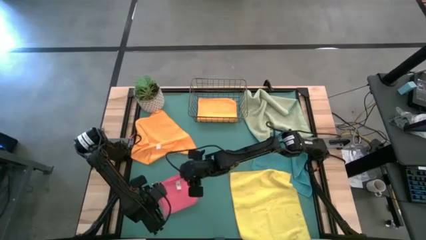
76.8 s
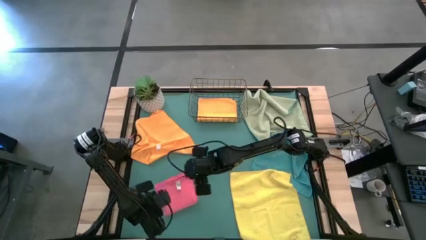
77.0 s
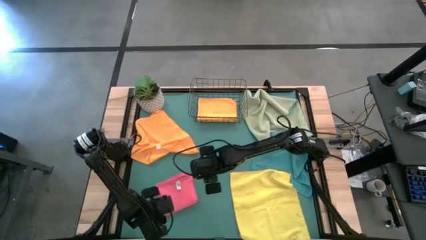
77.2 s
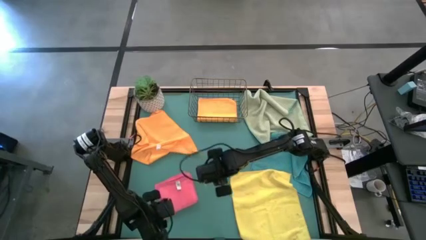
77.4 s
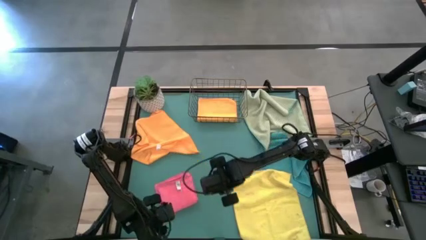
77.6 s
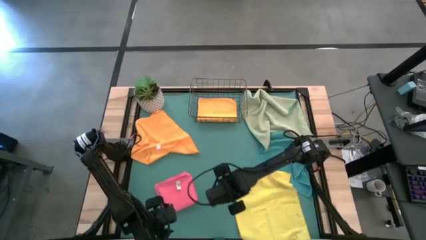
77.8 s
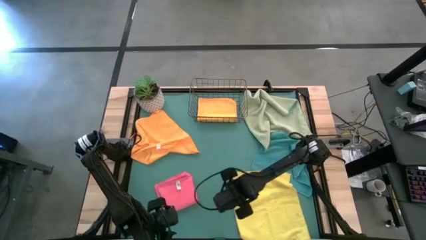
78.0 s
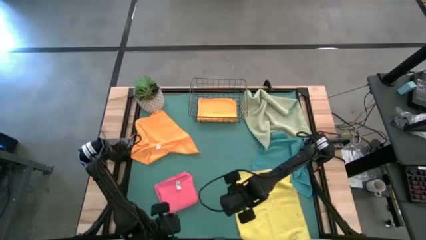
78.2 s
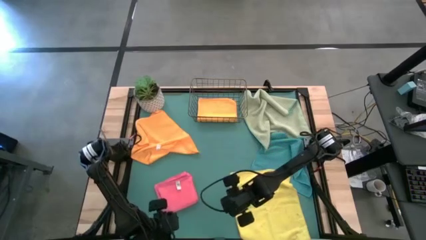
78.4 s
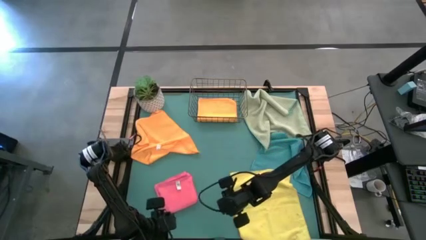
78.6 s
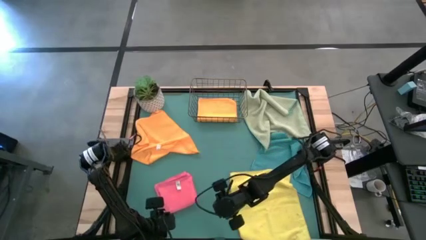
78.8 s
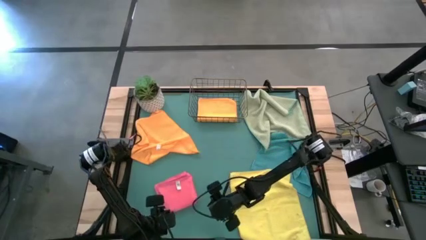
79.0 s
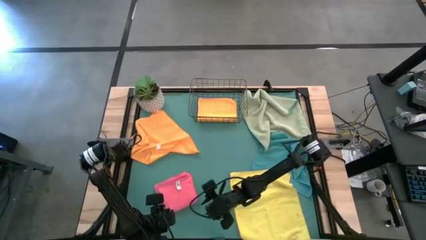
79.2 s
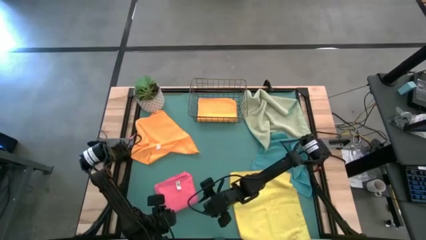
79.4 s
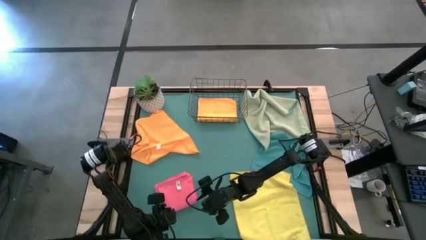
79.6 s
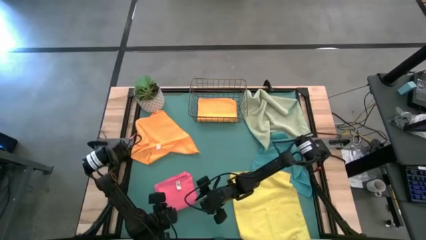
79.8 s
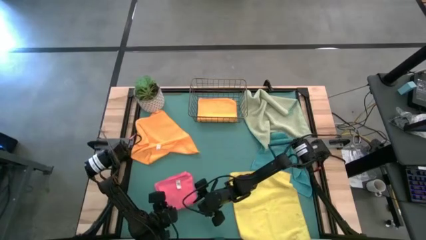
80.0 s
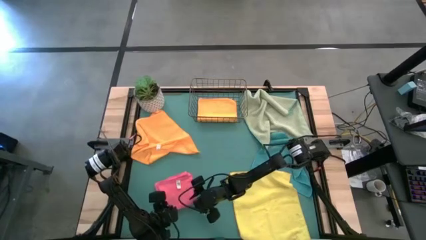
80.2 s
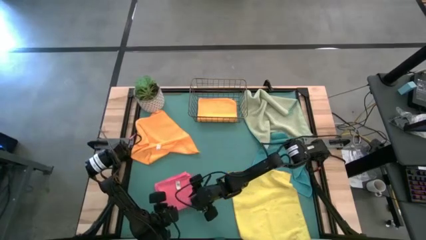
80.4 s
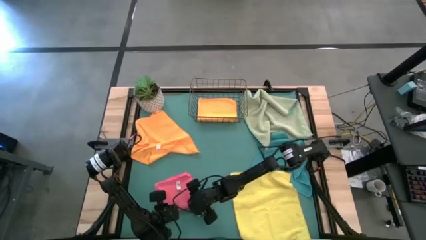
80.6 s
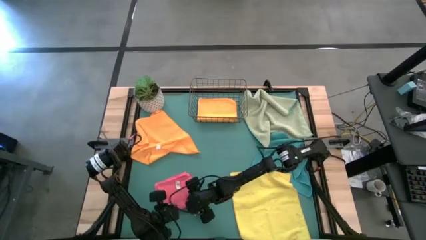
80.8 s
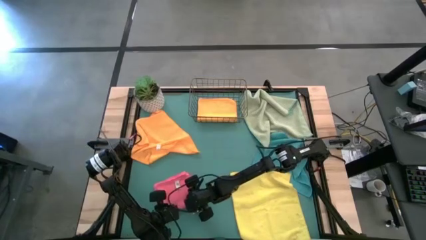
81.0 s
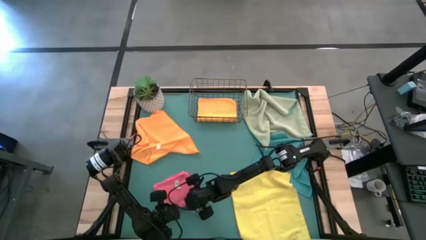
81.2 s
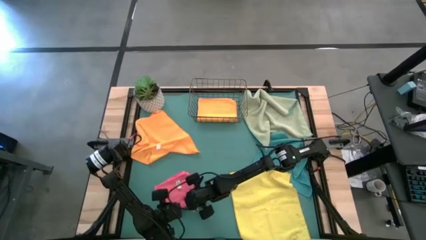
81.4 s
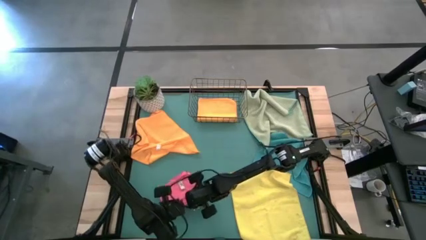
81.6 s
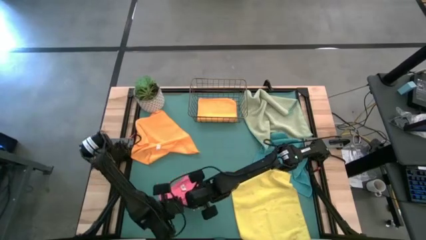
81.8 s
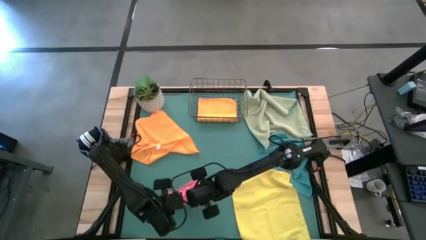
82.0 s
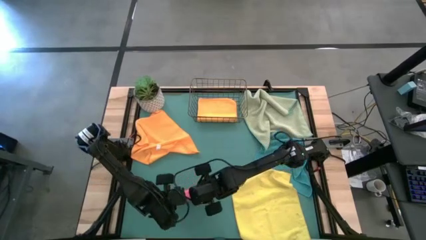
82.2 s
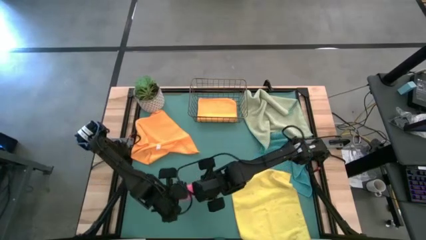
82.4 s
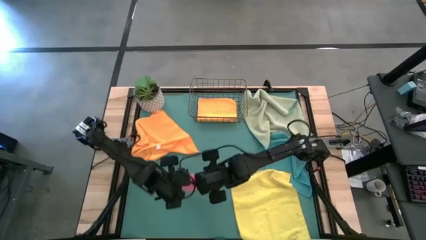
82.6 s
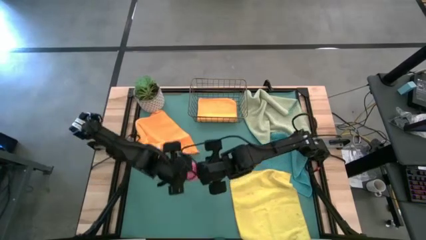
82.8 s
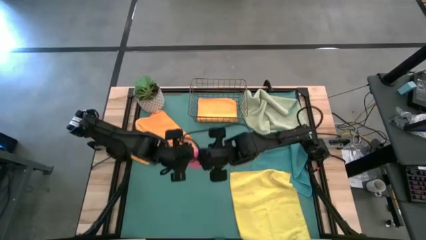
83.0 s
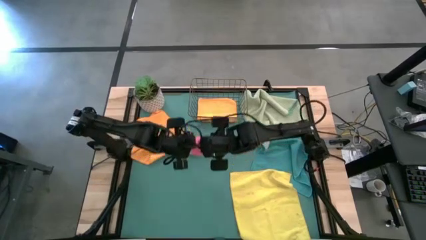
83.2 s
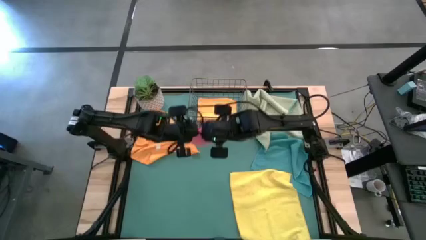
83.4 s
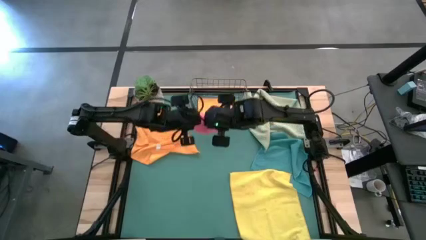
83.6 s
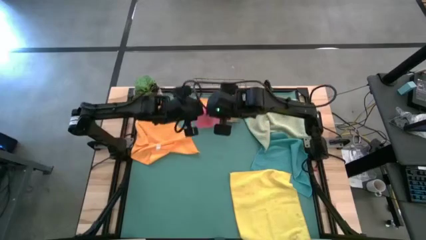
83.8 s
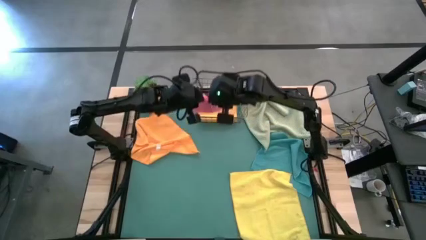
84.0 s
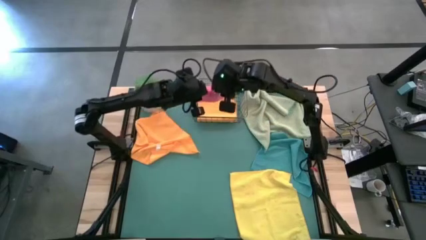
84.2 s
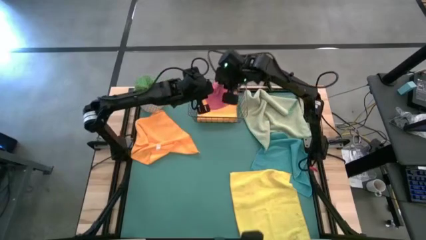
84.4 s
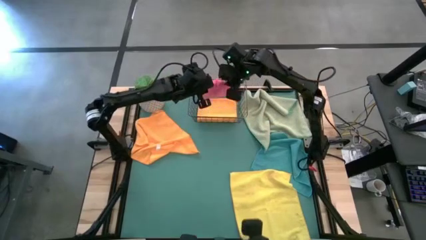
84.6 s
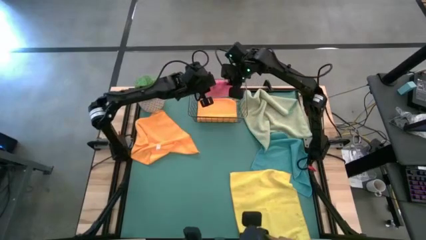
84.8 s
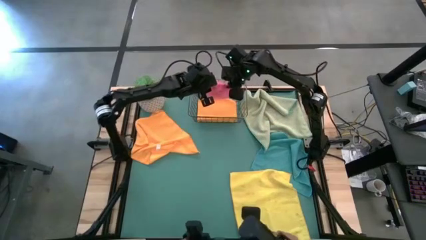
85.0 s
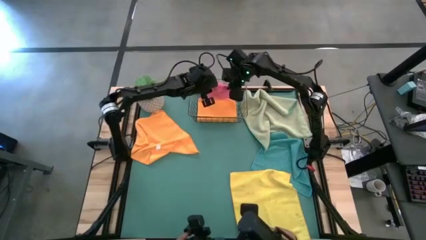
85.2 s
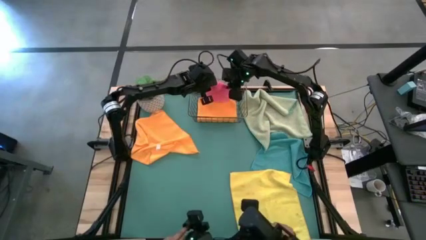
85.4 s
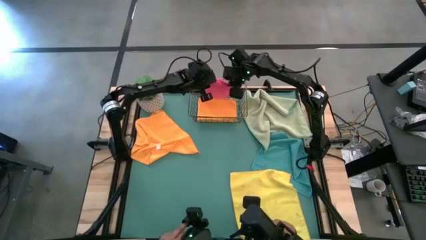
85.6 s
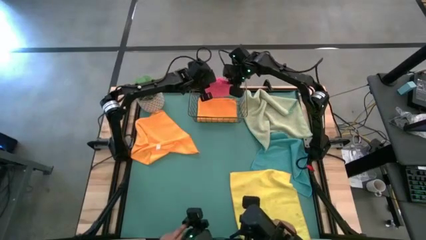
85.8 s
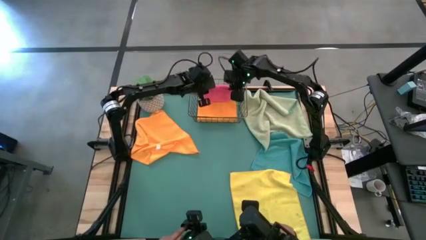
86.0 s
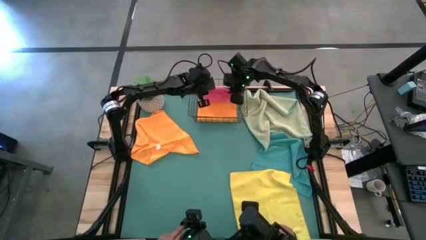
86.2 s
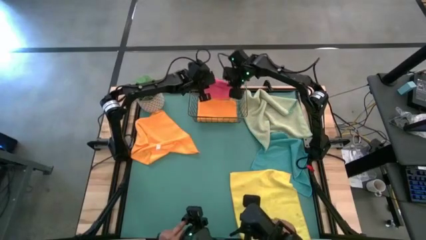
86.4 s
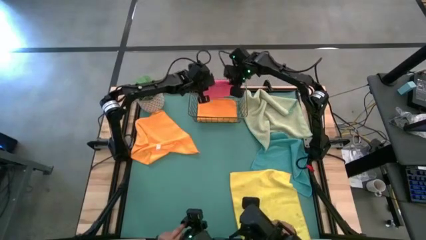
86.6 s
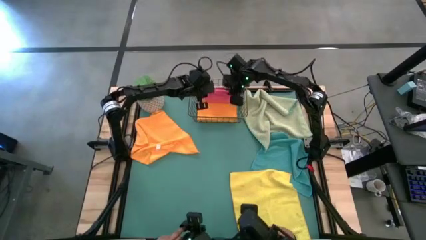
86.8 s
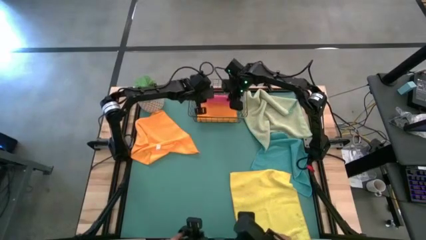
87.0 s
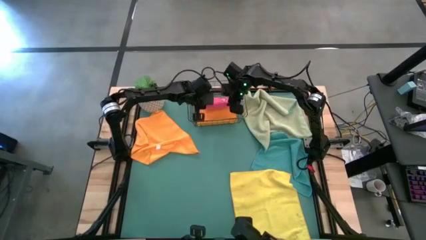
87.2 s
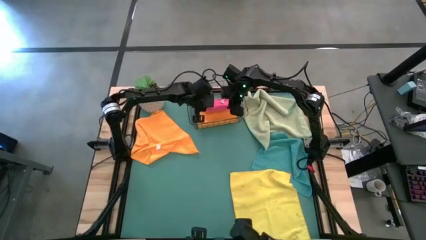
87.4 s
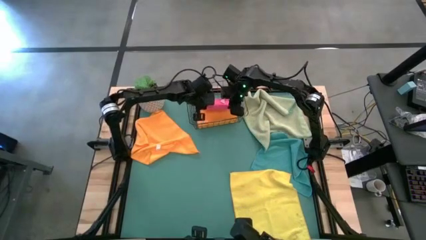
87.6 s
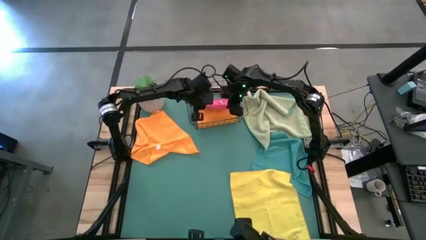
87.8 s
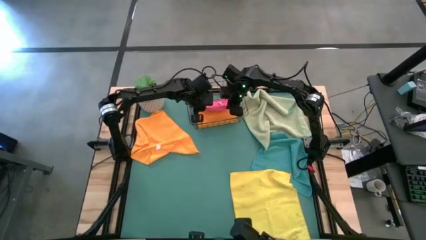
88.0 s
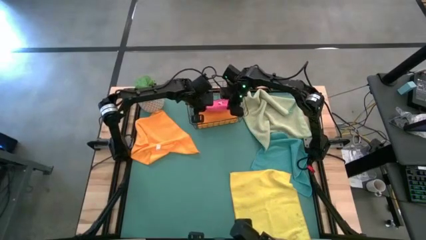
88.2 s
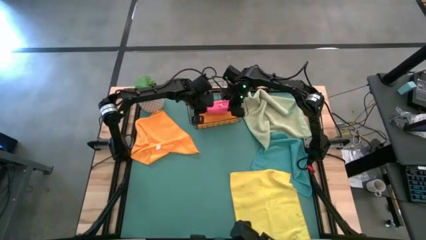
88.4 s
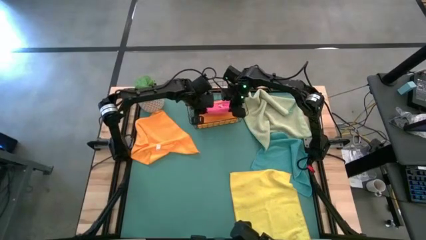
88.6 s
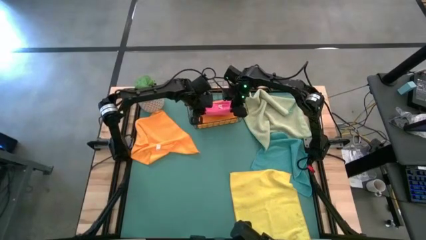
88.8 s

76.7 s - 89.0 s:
Task: Fold microfiber towels
Put the folded pink microfiber towel into the wire basket

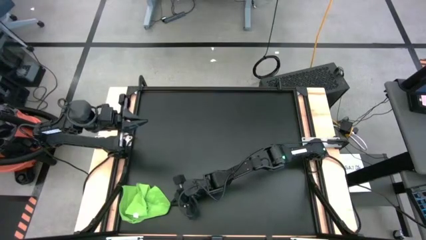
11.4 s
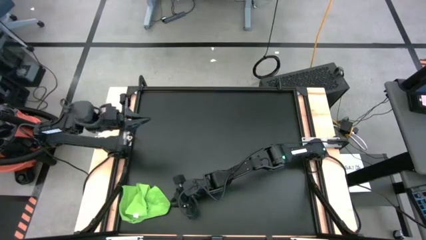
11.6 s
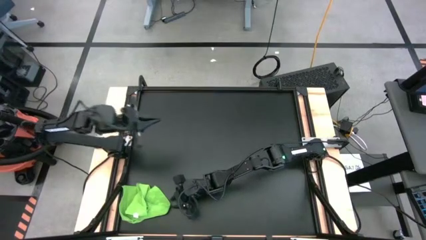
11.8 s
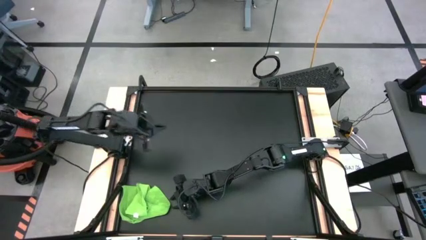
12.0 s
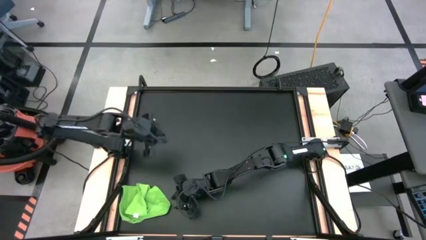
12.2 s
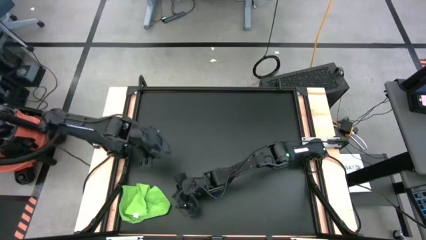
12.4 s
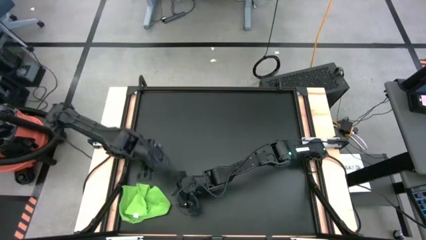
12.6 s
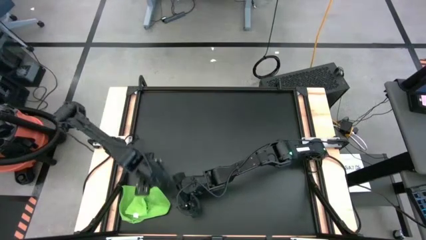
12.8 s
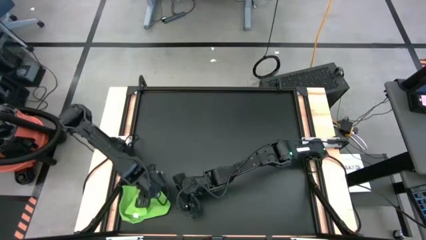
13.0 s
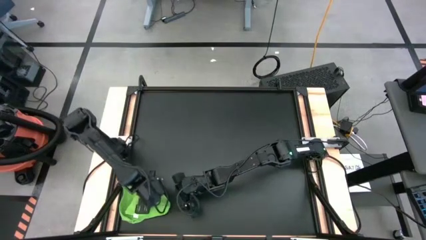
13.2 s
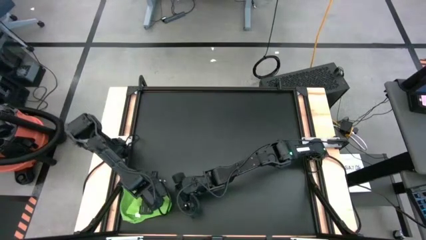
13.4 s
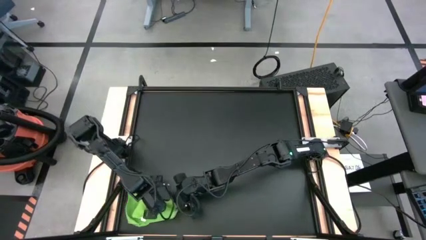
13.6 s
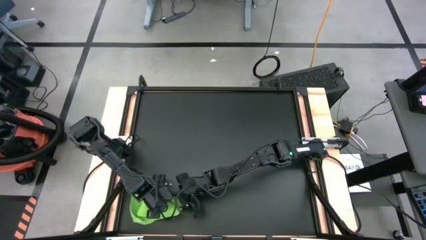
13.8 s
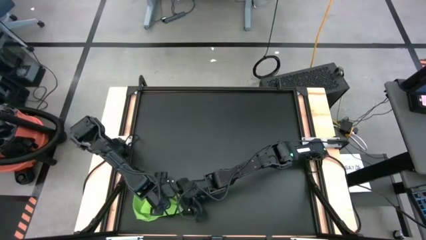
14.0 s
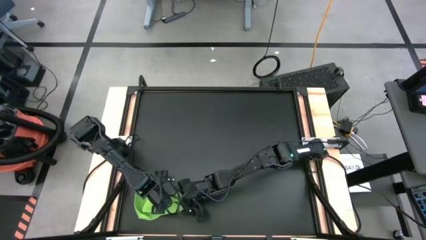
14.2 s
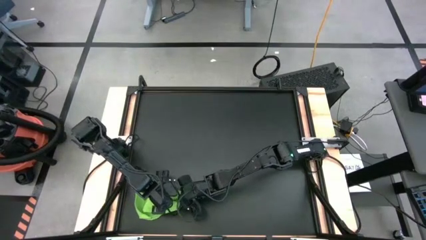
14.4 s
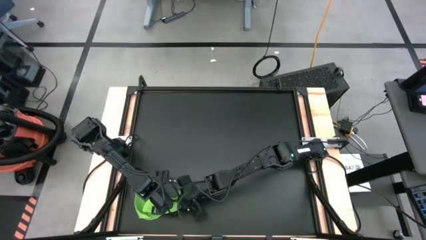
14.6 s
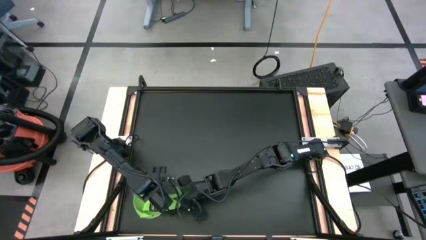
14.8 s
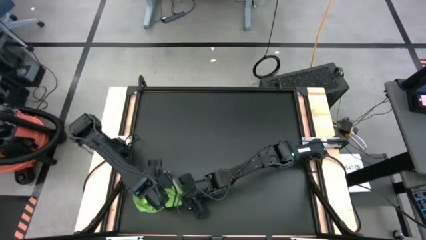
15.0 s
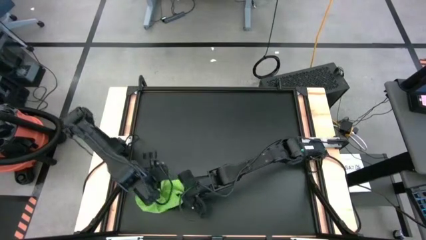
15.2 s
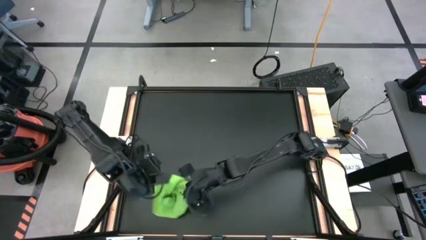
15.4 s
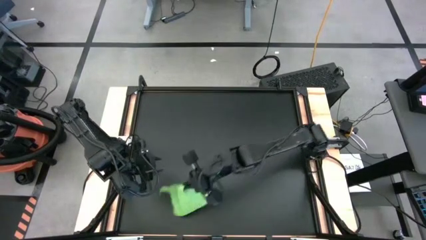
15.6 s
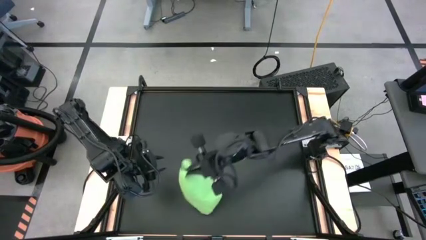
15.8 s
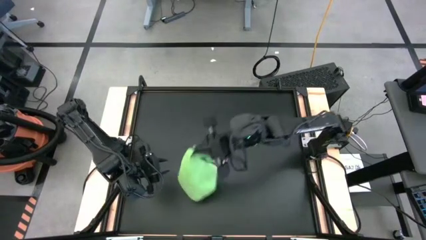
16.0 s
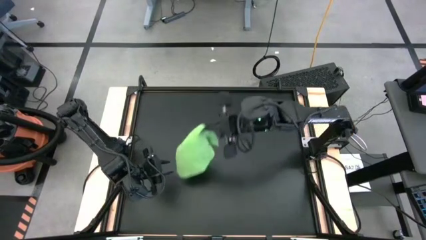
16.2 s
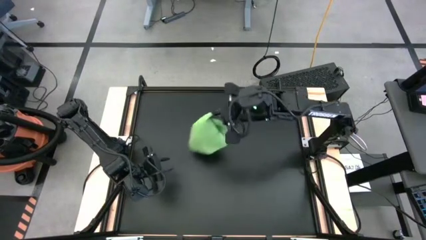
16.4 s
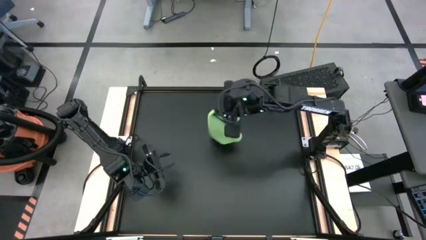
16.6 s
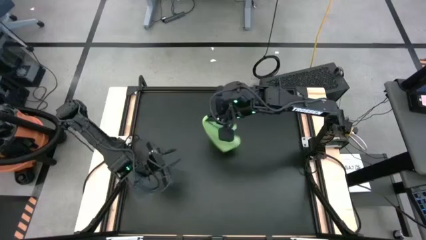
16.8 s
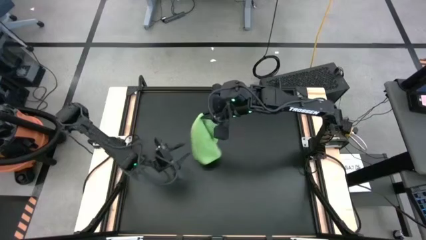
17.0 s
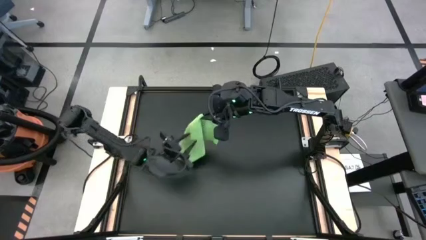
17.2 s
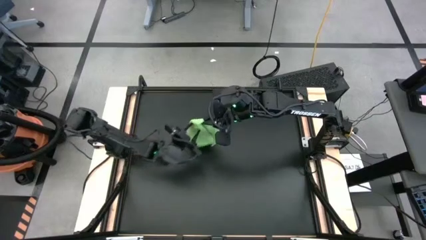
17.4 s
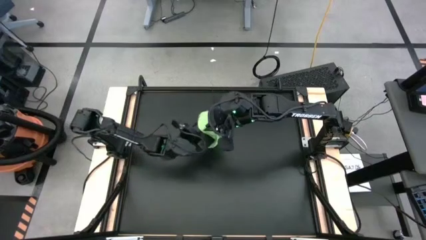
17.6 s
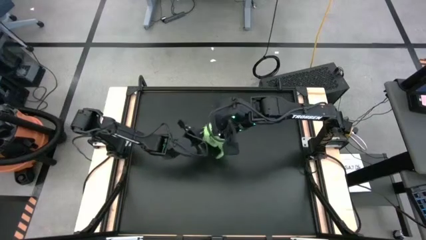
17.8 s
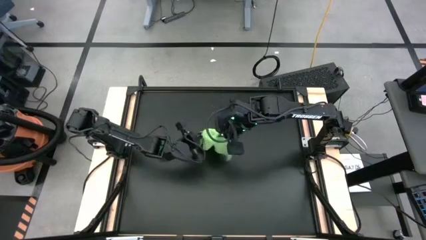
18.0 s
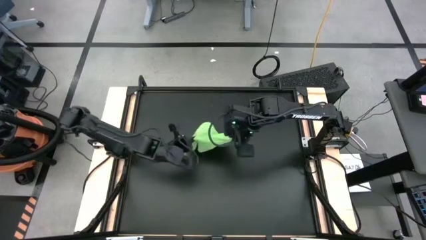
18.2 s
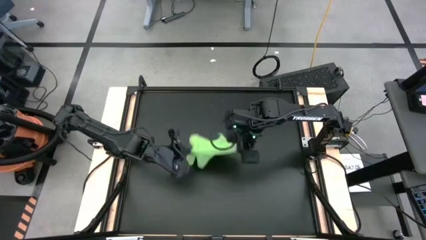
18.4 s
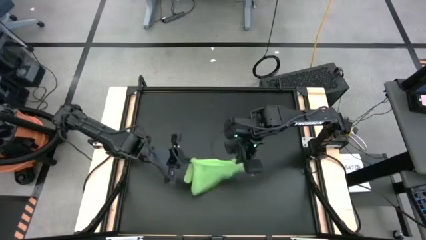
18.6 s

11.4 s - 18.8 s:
Task: Roll towel into tight, uniform cylinder
Fold the green towel
